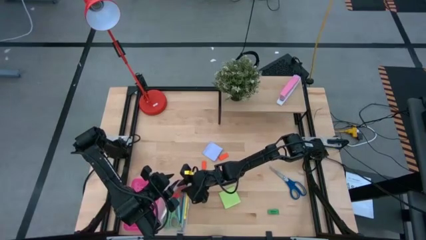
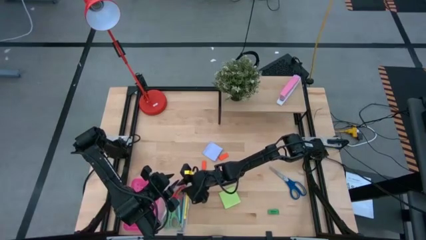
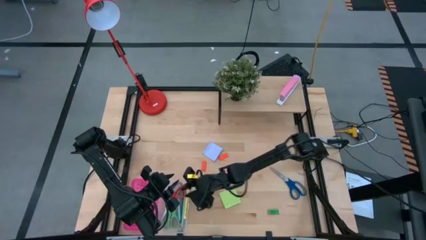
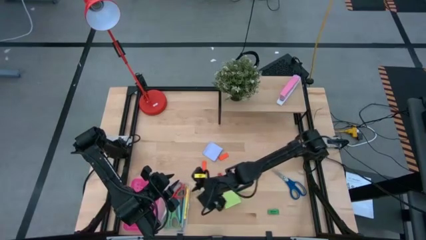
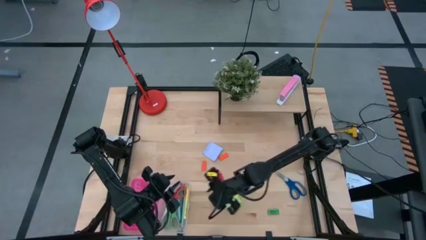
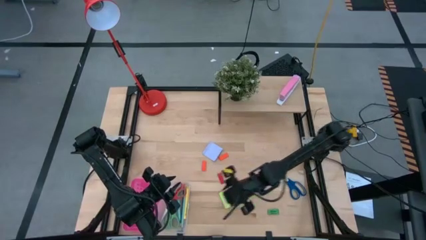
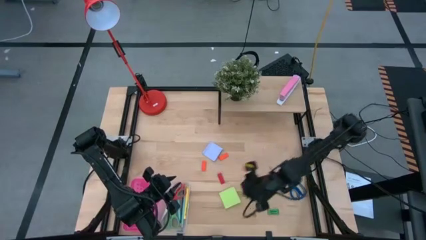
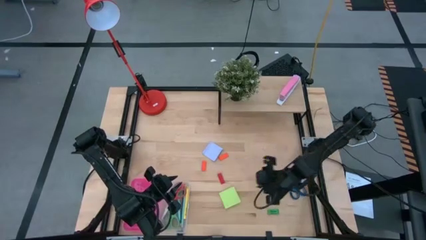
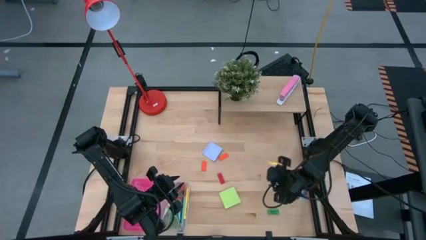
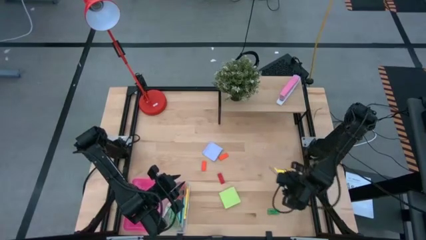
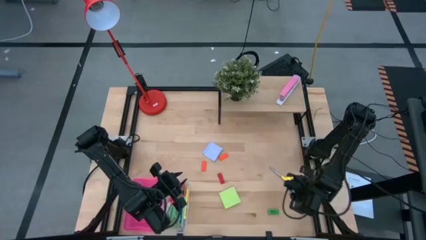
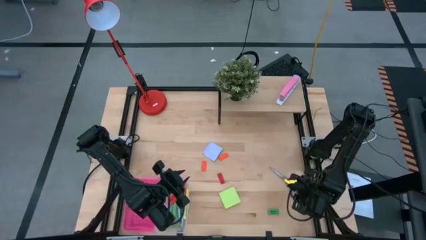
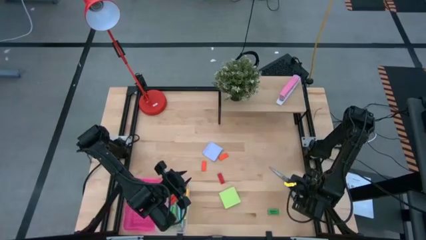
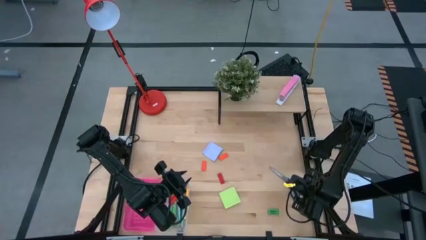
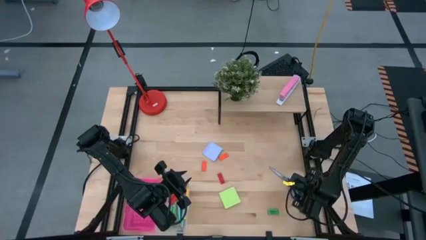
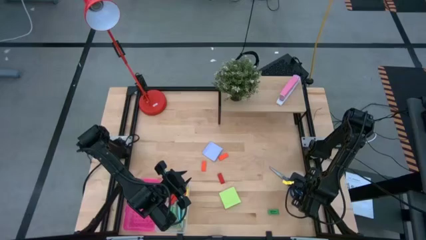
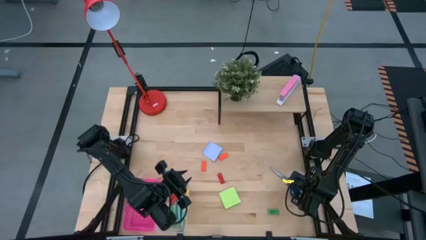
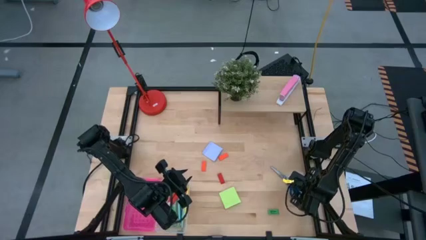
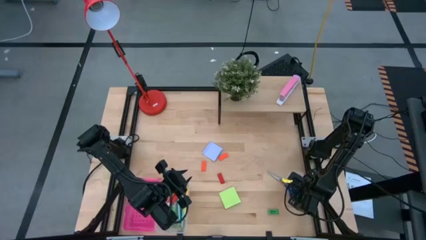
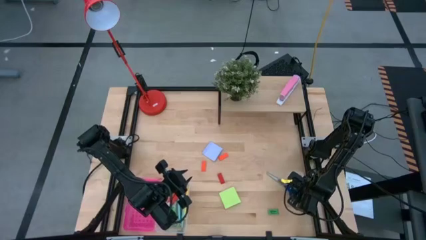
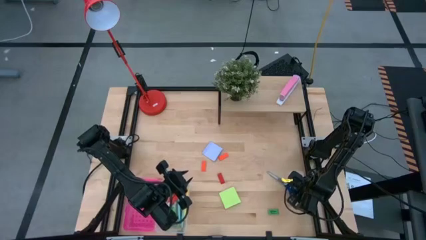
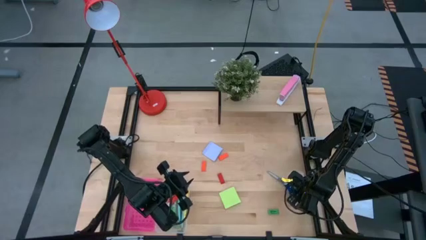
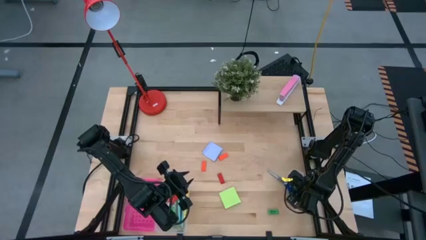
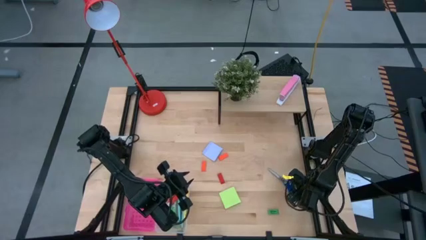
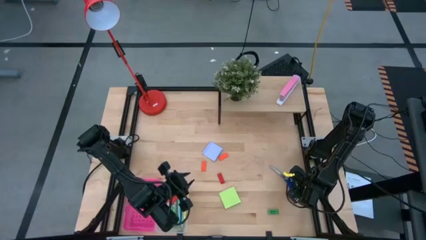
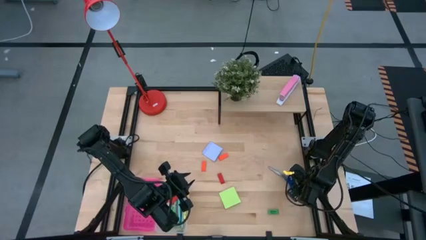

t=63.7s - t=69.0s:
Task: Pack school essentials
Put the blue scissors into the pink supply box

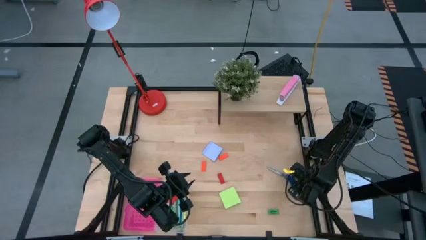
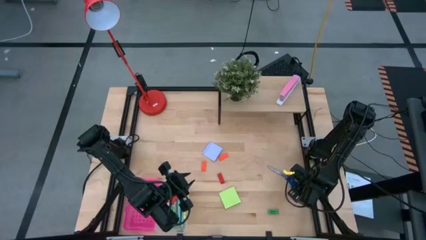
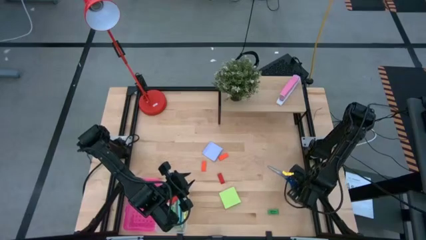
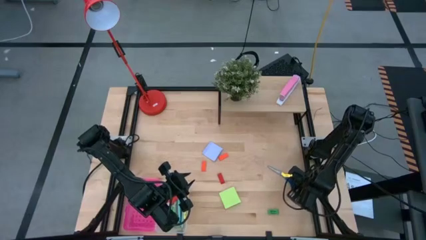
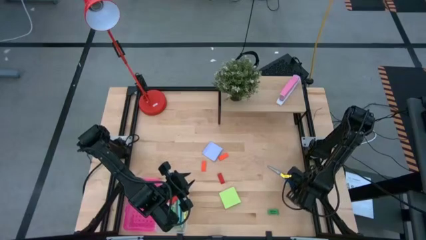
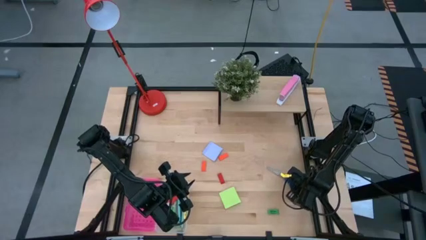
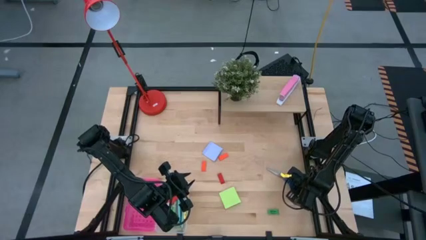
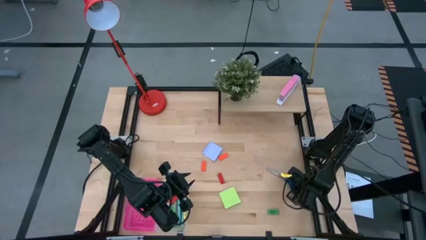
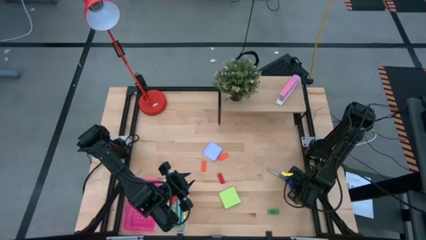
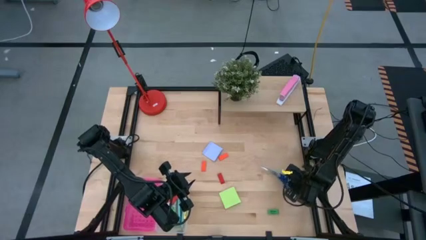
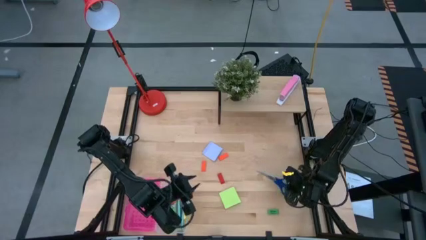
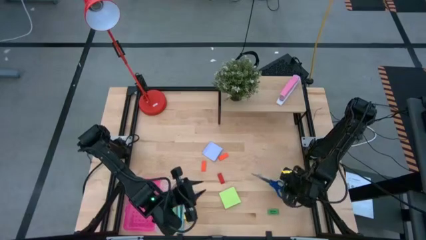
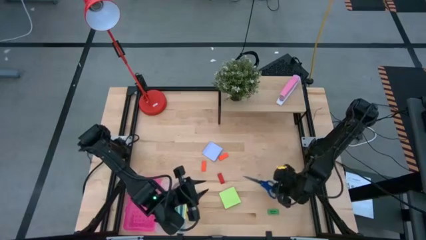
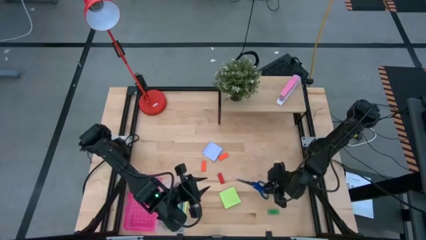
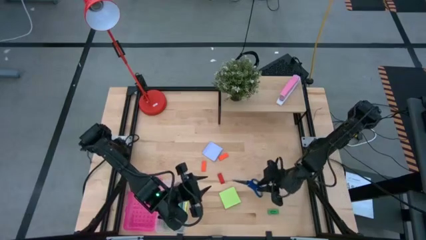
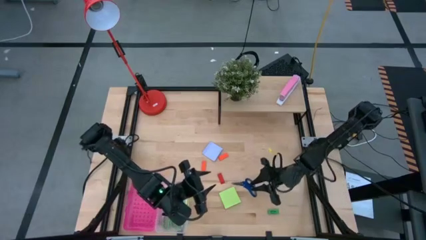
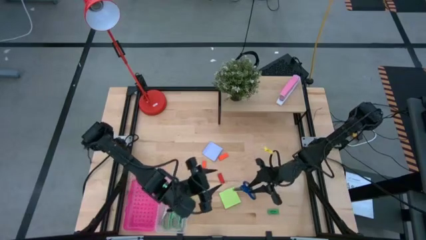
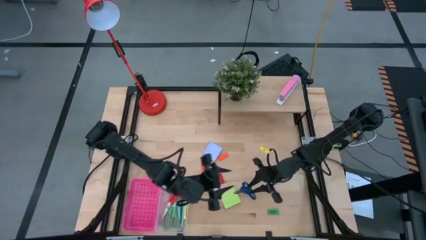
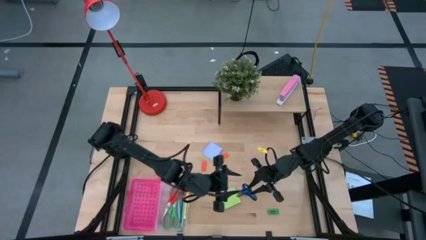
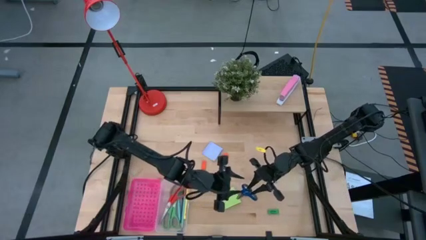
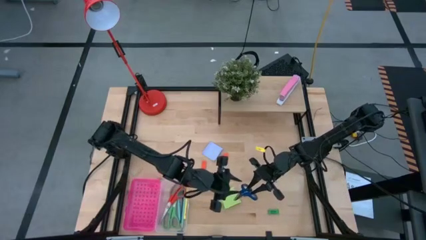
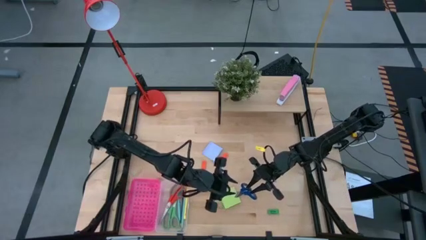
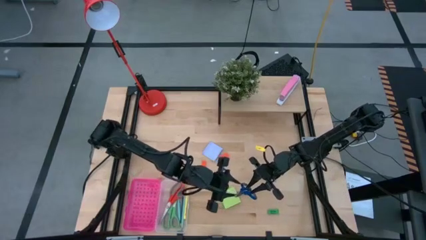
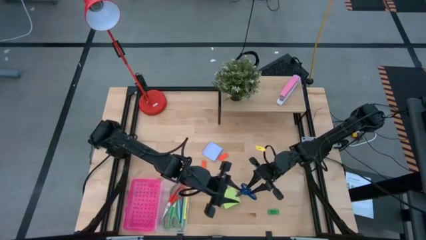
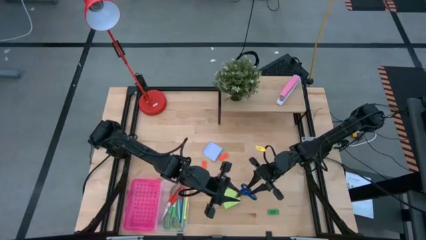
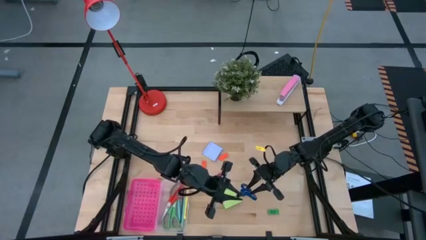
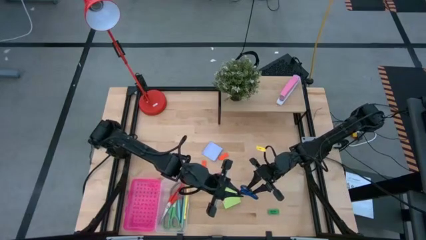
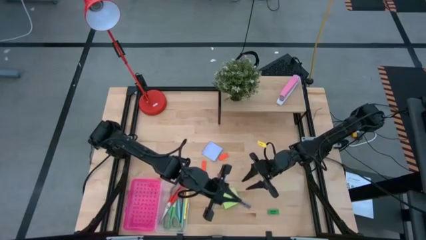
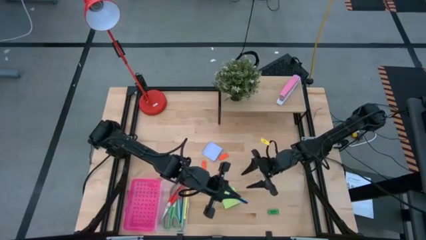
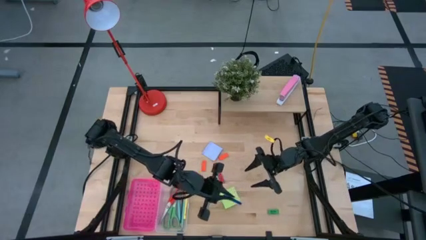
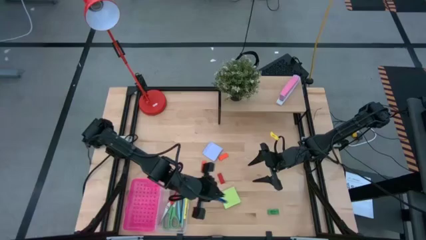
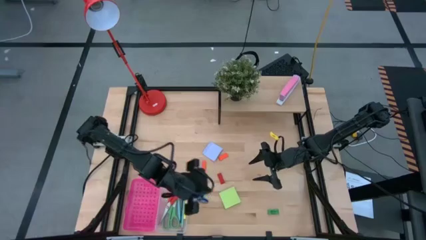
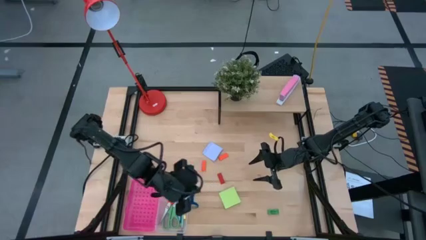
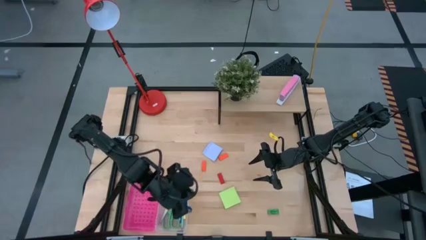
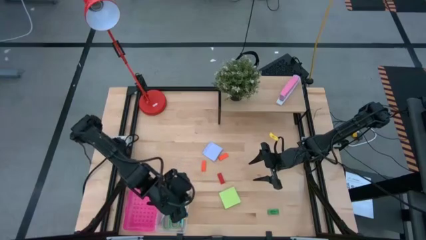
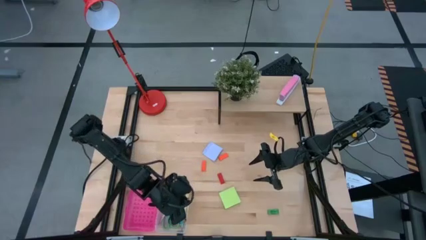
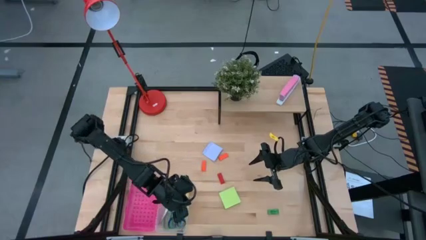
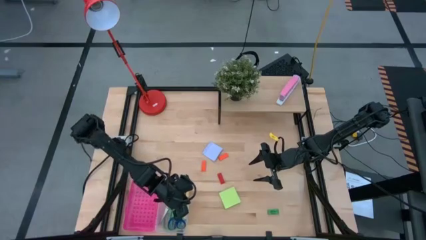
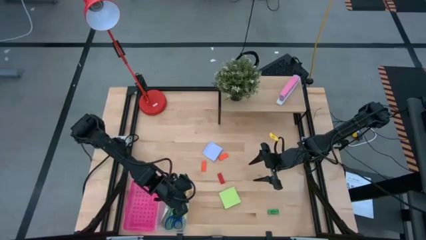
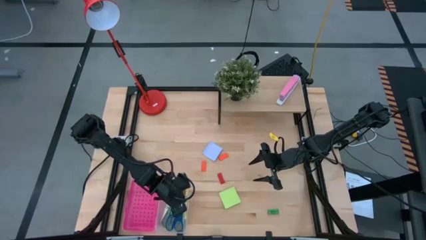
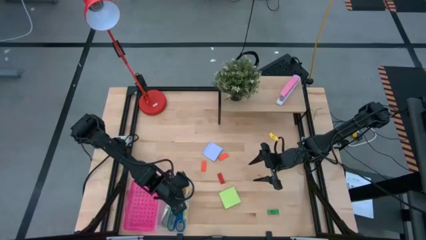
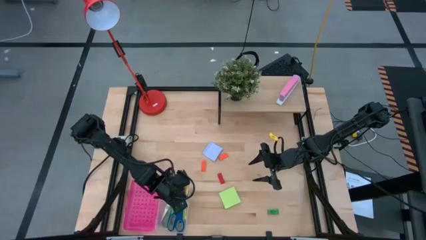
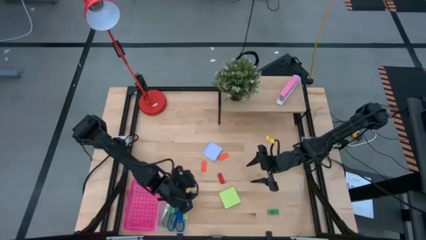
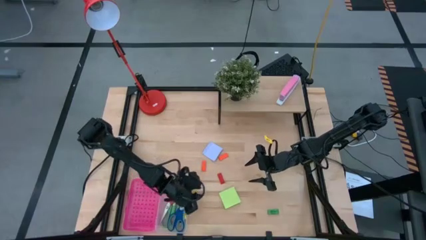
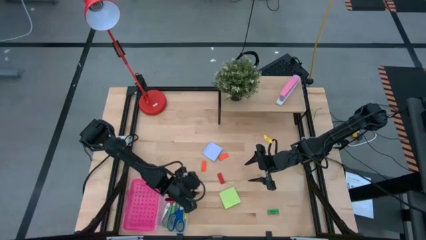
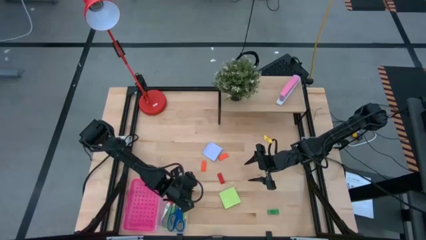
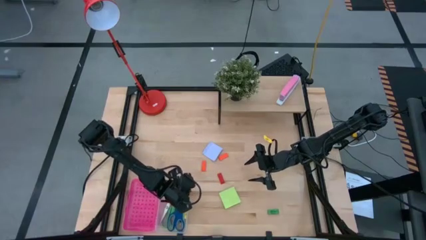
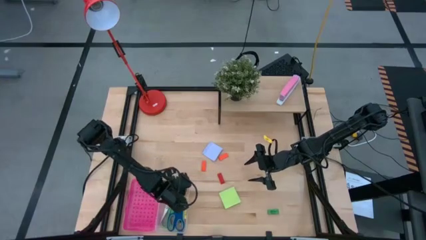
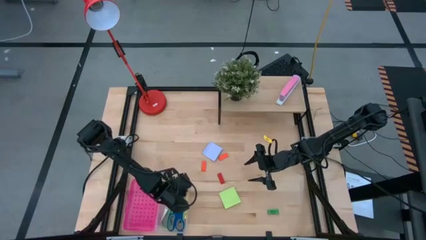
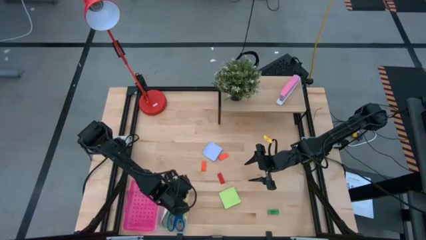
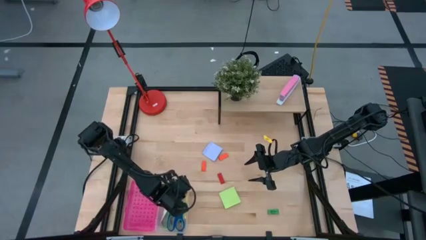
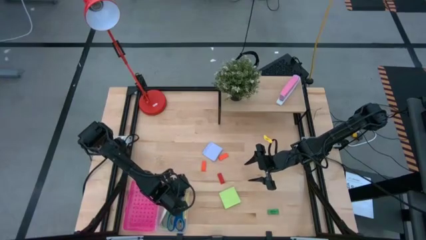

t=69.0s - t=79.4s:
Put the blue scissors into the pink supply box

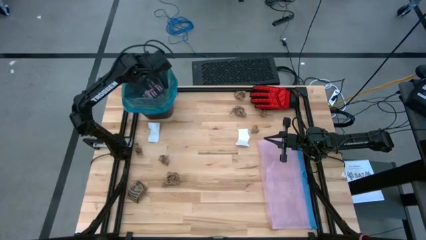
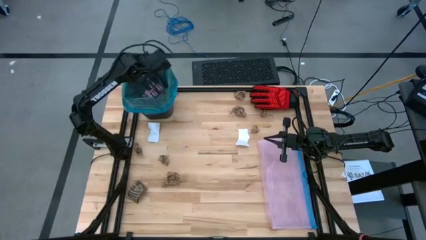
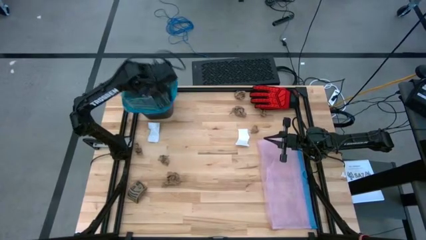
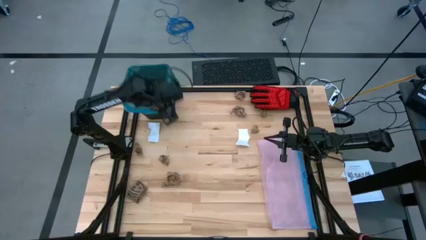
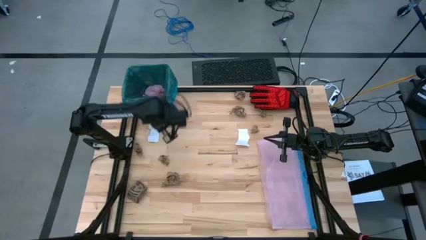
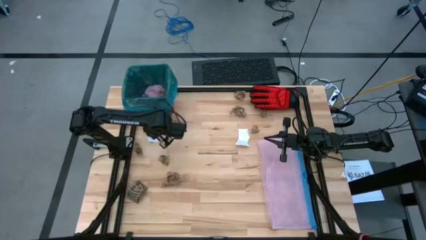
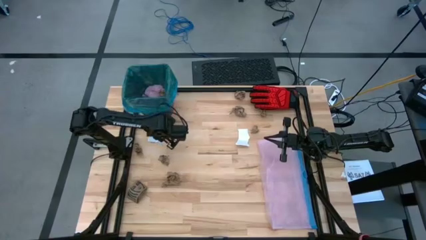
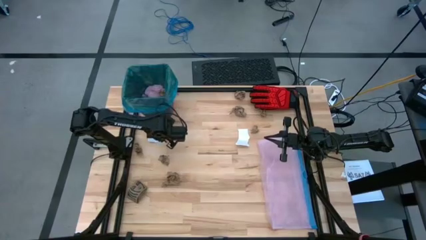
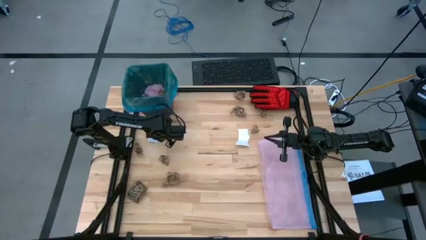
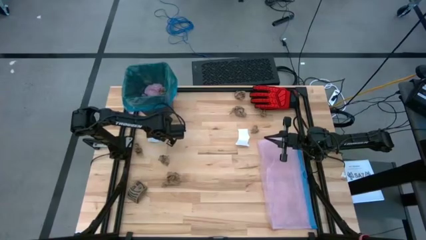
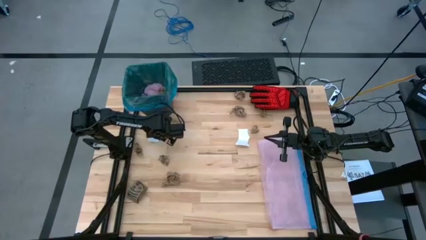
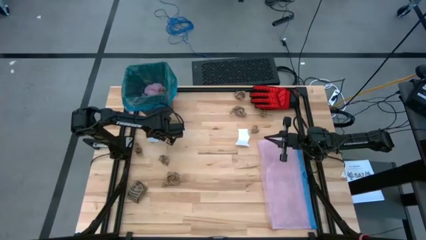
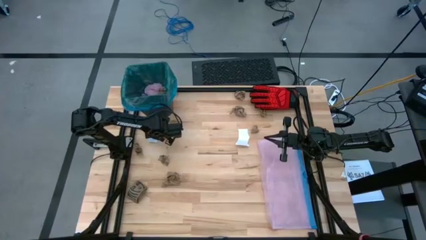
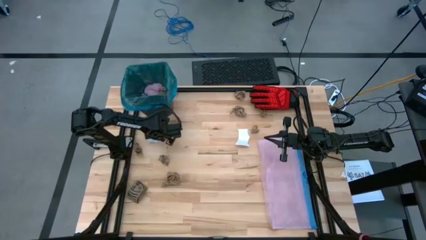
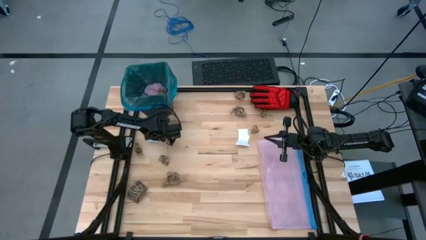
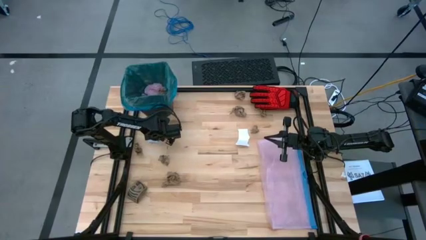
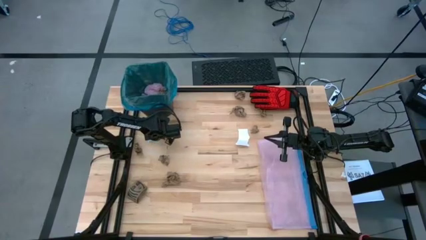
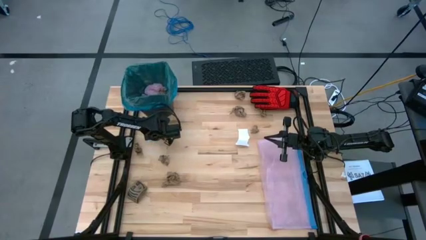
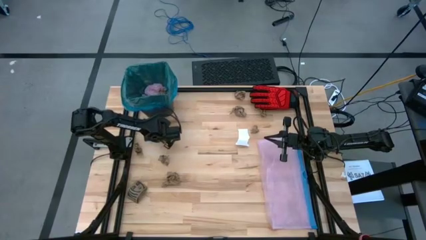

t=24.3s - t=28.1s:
Task: place trash/remove bag and relplace
Put the white torn paper into the black trash bin
